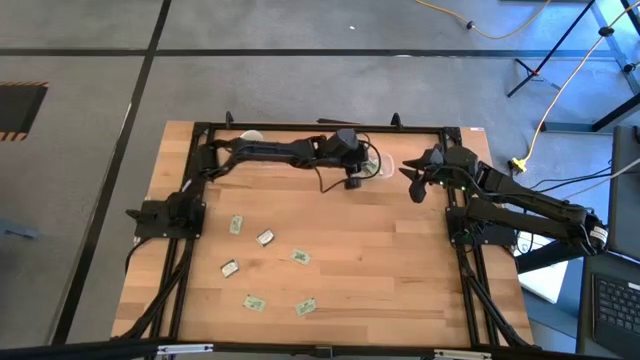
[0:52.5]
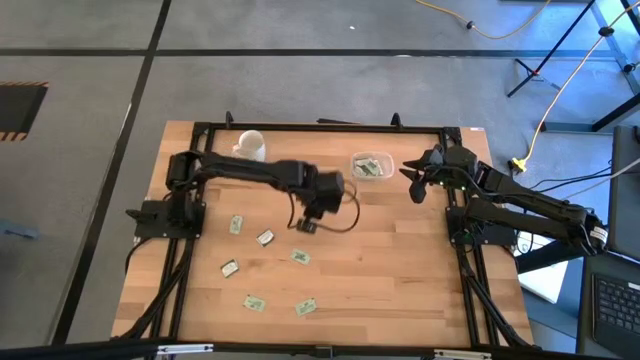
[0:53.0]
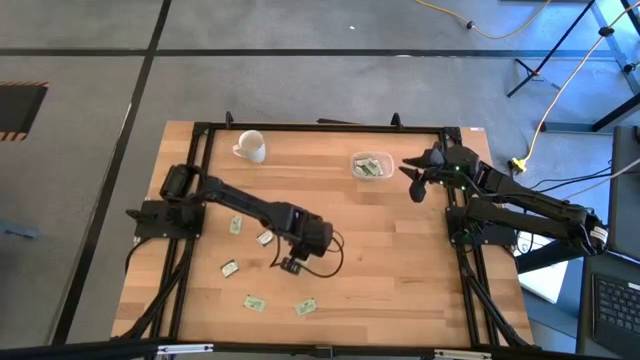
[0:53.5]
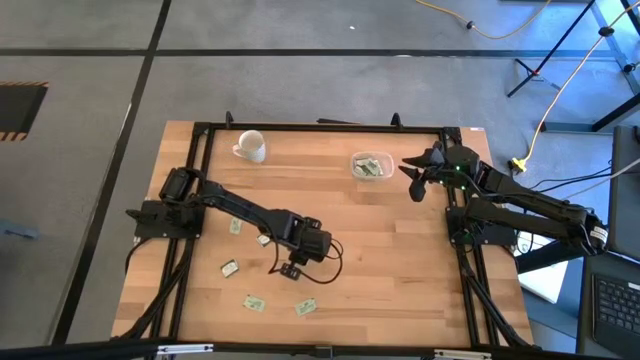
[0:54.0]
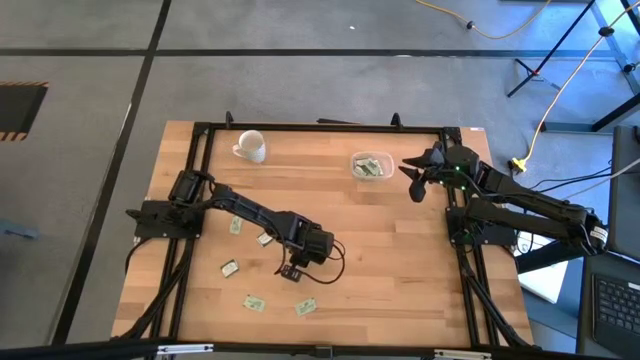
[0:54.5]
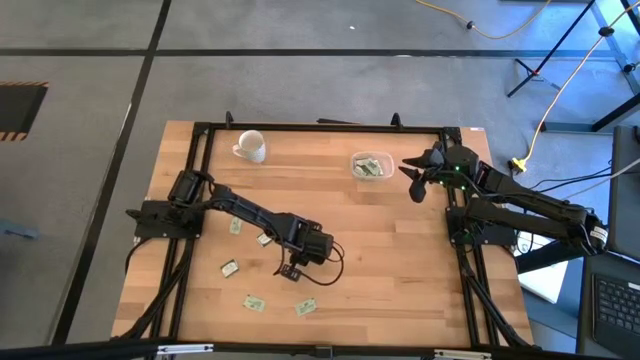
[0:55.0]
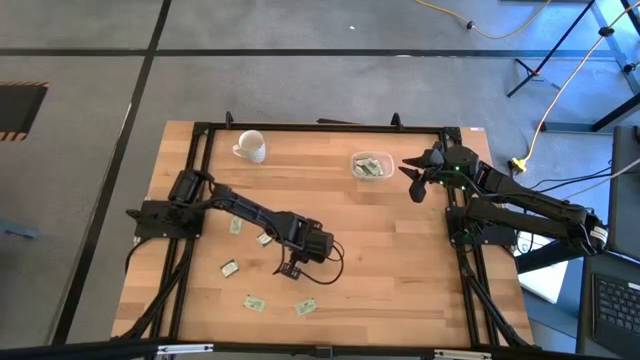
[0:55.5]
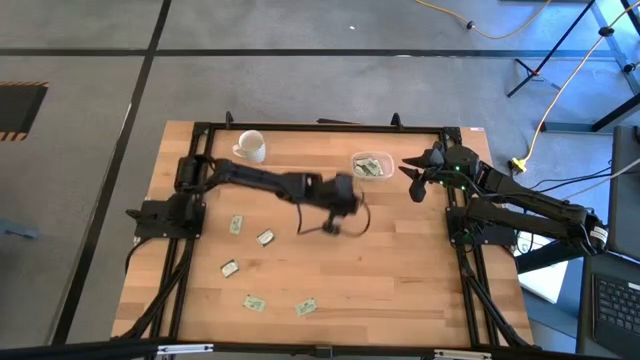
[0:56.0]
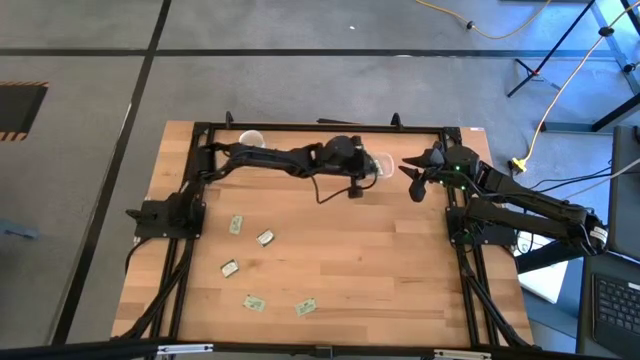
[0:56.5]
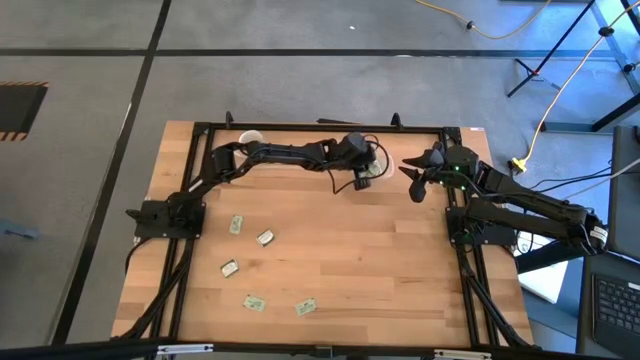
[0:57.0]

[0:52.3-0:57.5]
Task: Pick and place items into bin
Put the stevia packet into the transparent bin

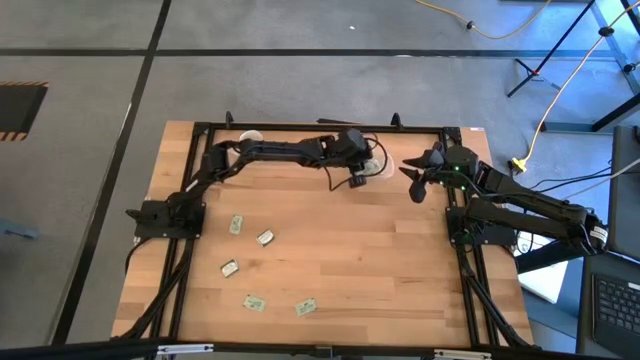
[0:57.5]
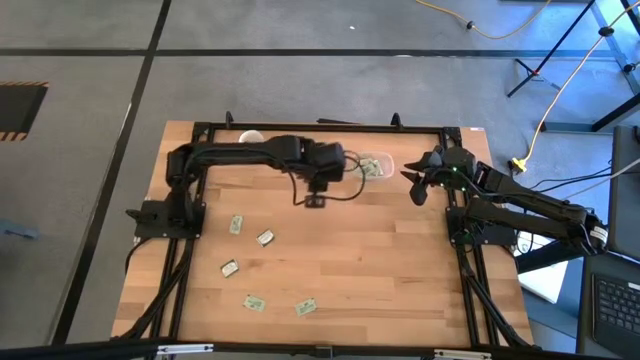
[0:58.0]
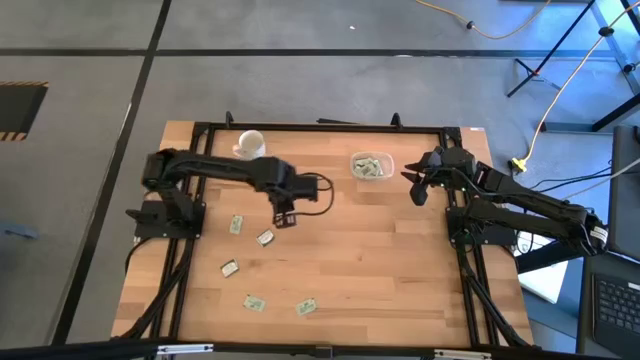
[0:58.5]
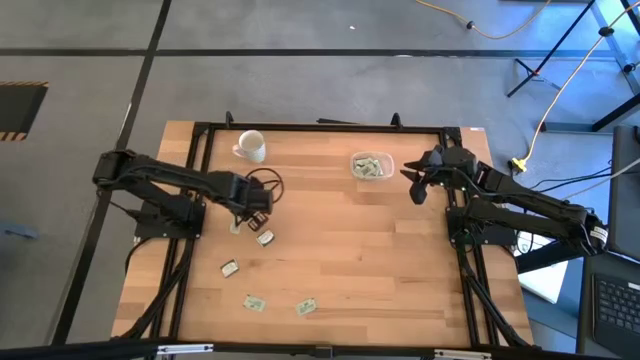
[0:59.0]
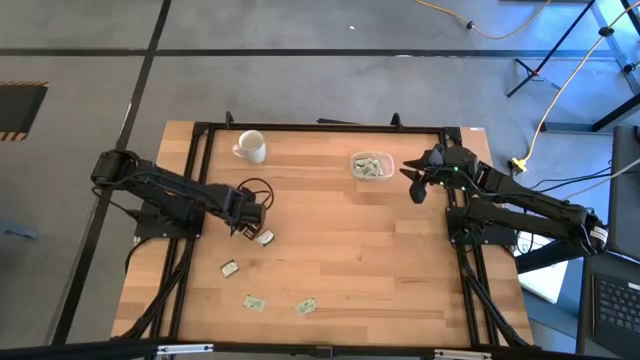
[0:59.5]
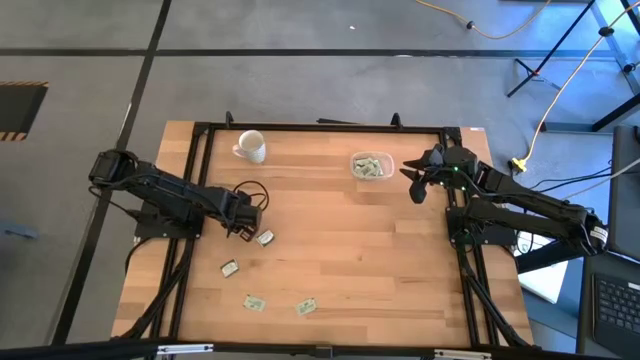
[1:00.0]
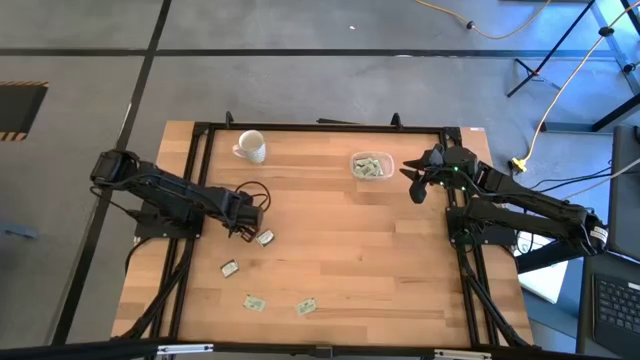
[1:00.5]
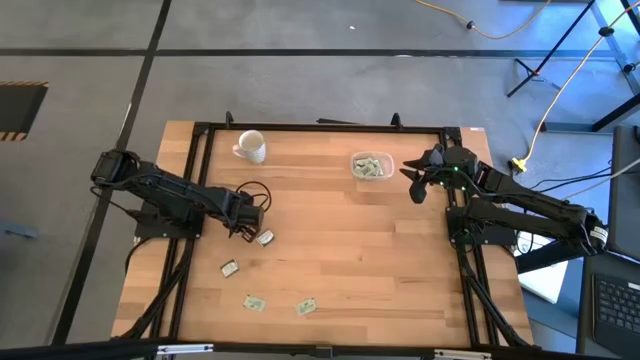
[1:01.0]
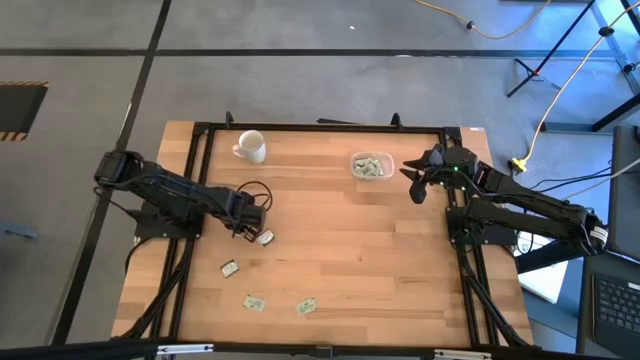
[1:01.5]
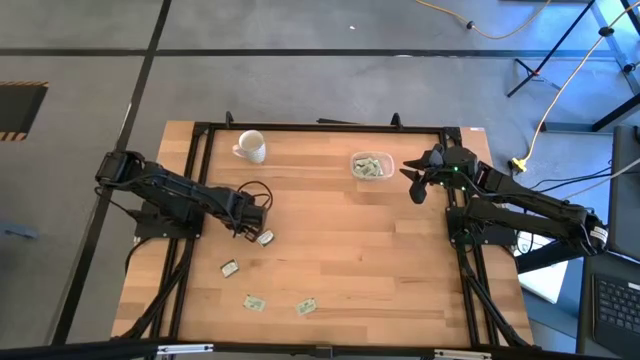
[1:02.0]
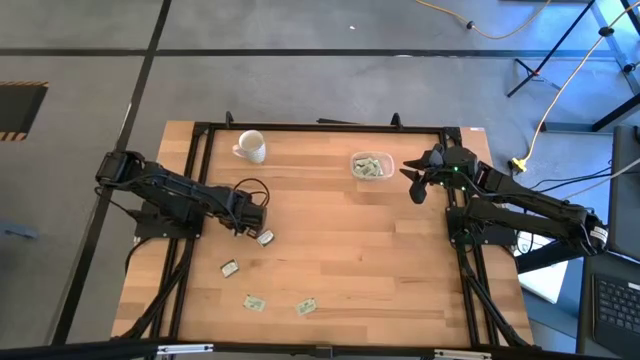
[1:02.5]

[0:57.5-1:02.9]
Put the stevia packet into the transparent bin

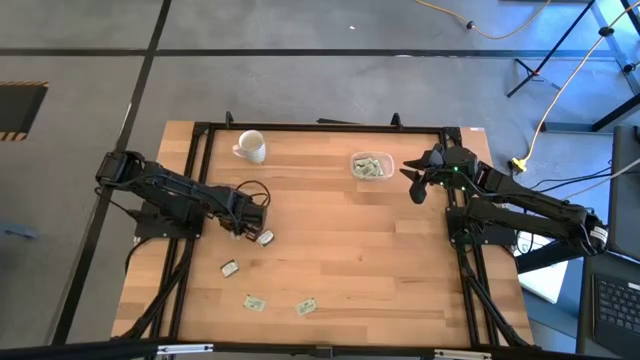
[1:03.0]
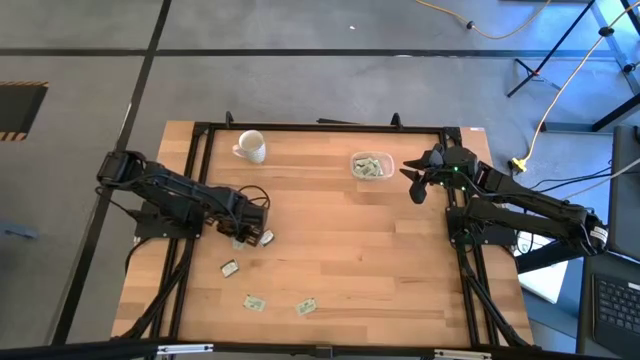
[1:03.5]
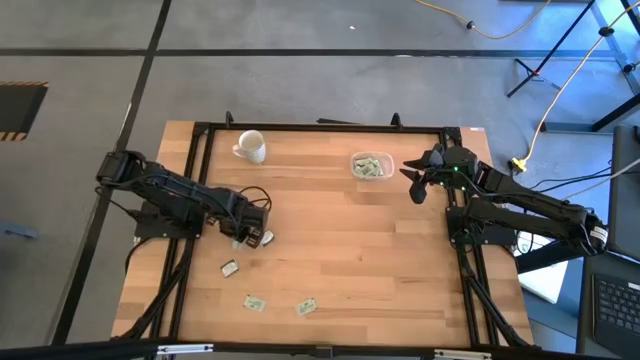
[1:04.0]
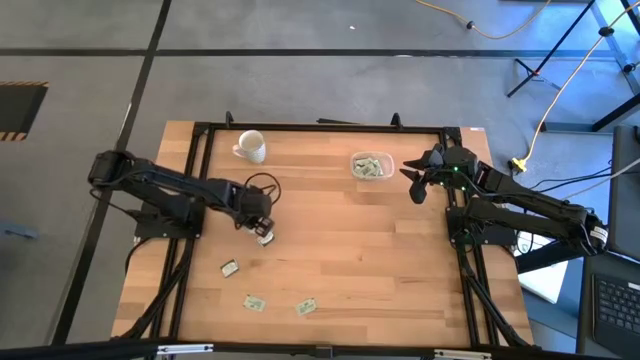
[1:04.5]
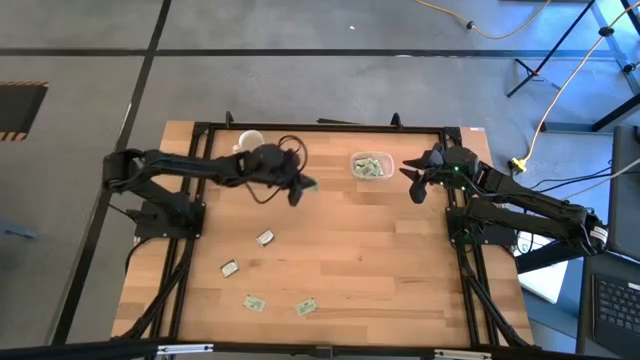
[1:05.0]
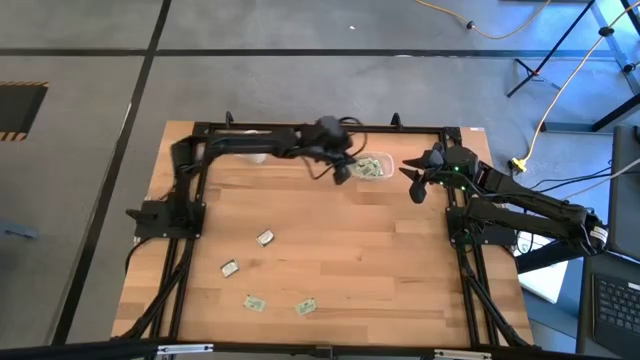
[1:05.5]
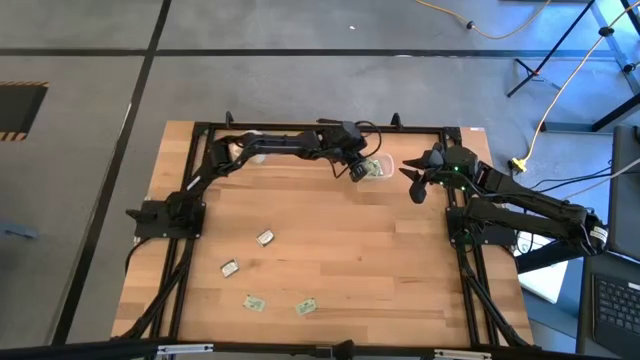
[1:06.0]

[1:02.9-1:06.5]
Put the stevia packet into the transparent bin

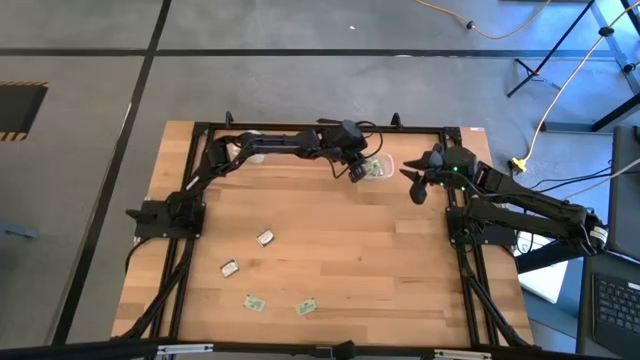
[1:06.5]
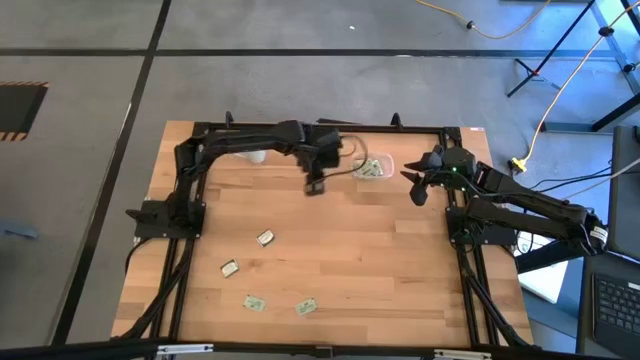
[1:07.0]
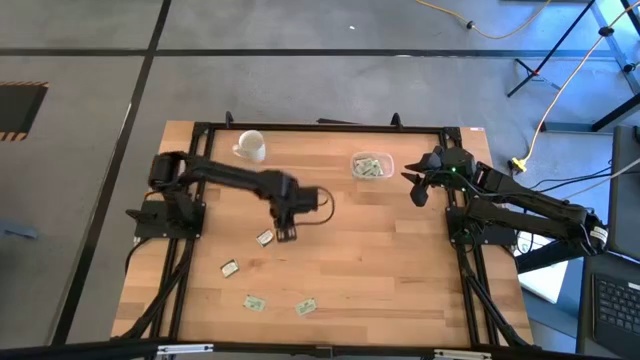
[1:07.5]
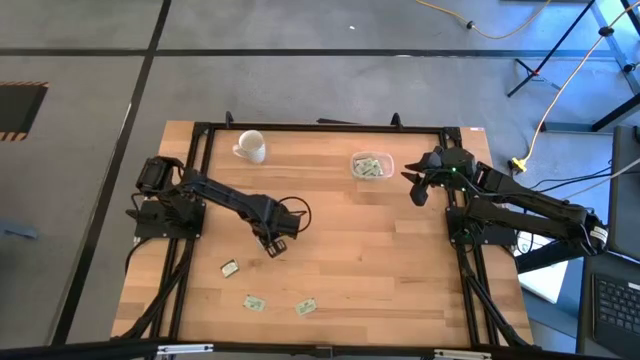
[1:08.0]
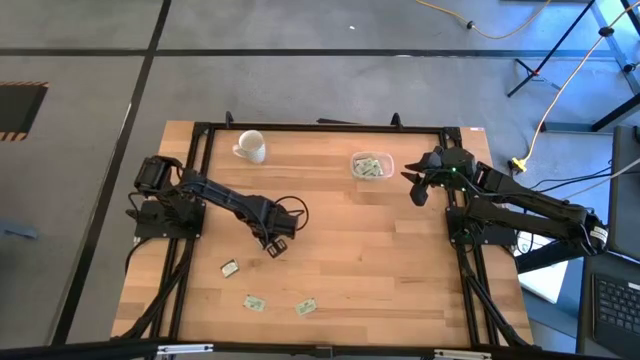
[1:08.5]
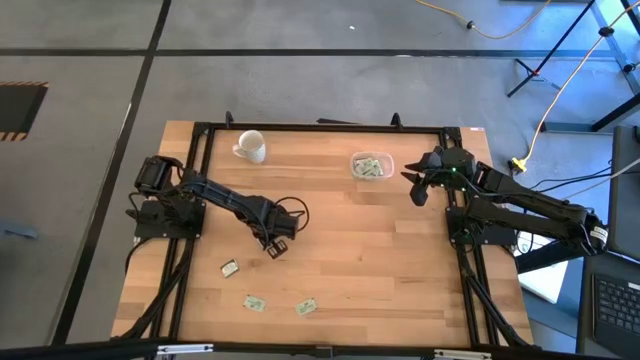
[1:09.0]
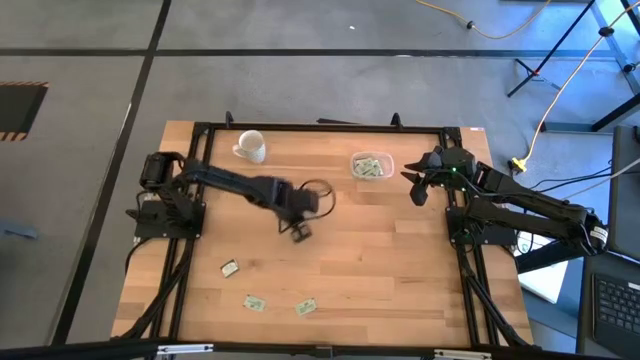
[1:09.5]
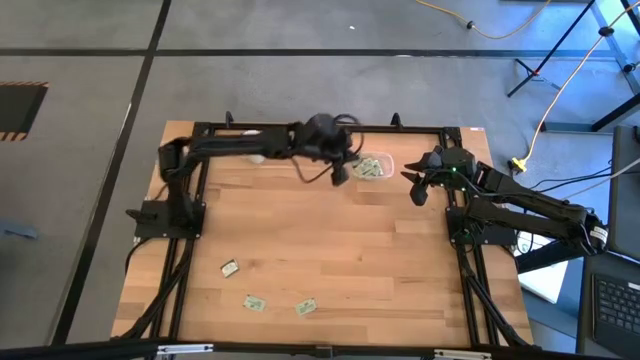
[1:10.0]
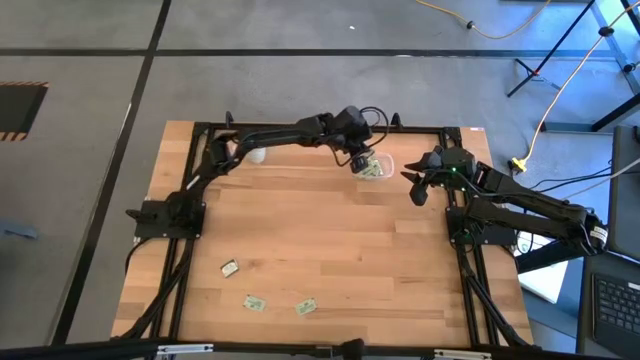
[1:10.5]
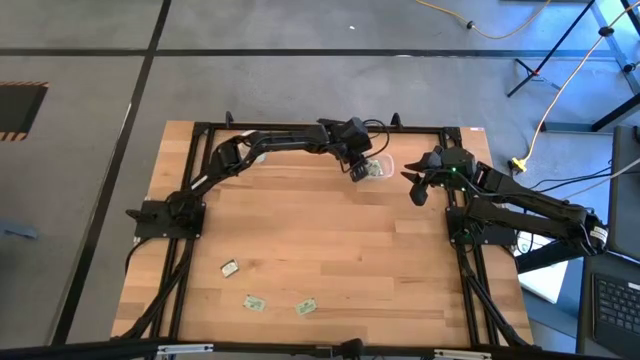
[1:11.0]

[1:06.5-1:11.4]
Put the truvia packet into the transparent bin

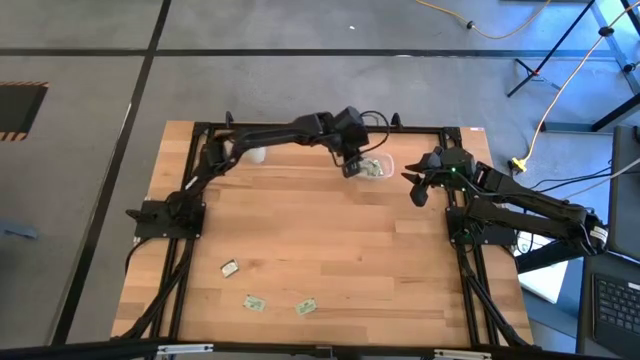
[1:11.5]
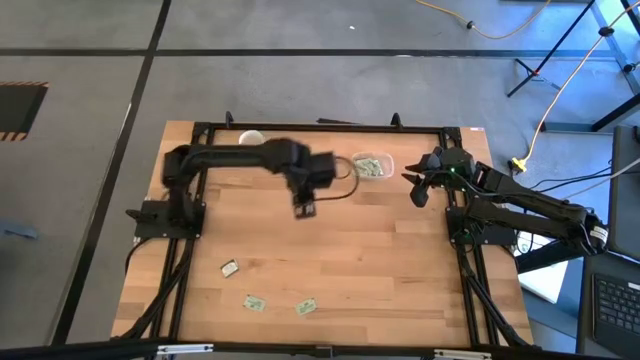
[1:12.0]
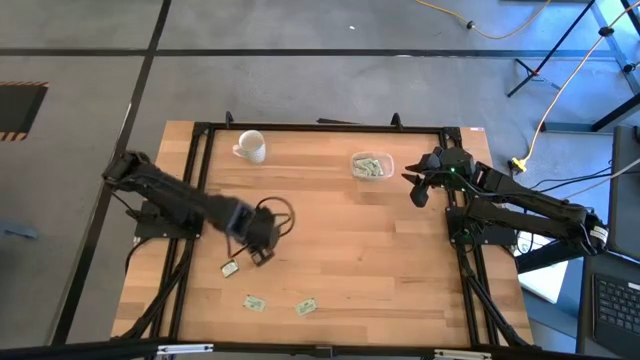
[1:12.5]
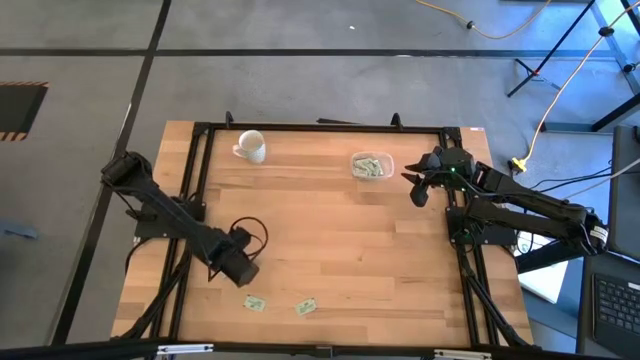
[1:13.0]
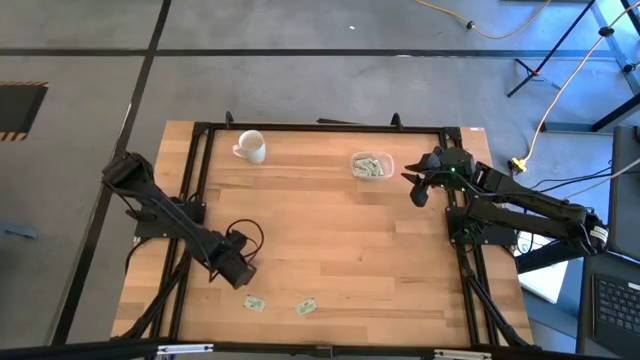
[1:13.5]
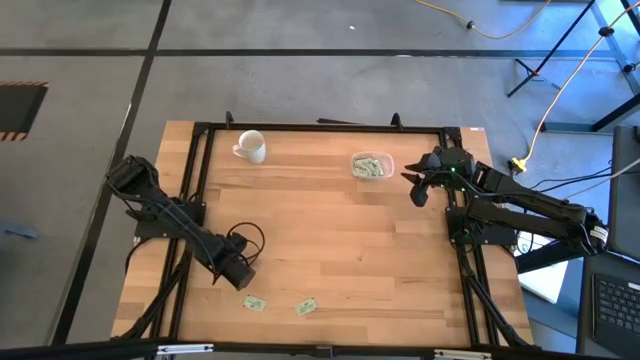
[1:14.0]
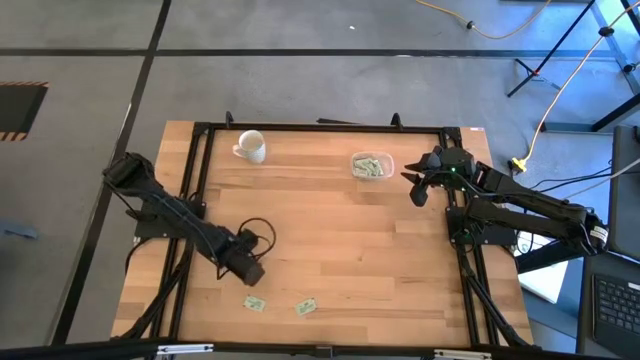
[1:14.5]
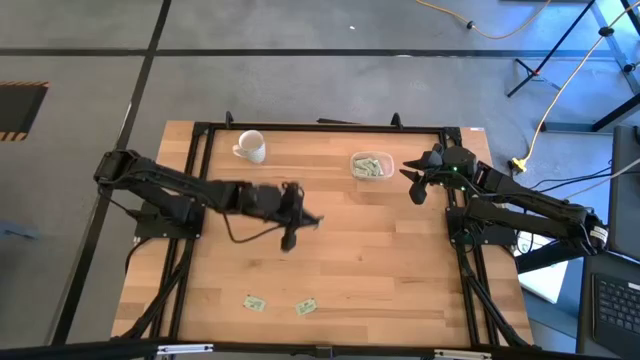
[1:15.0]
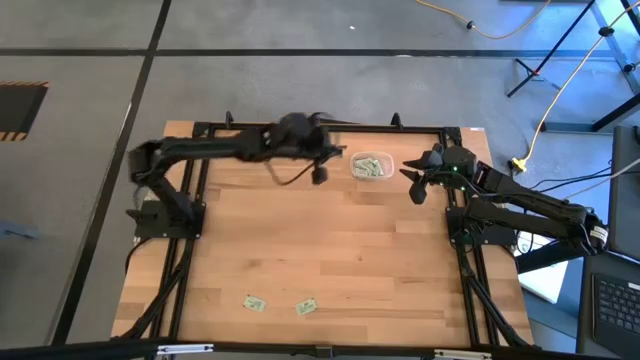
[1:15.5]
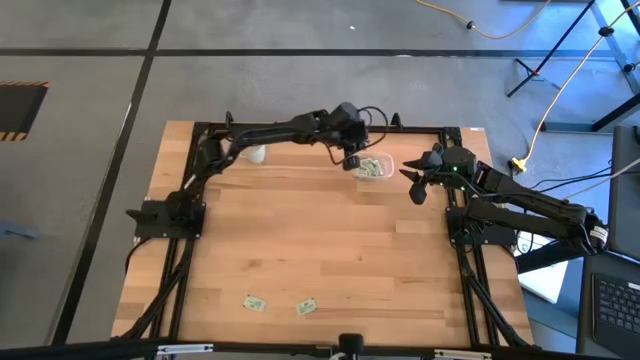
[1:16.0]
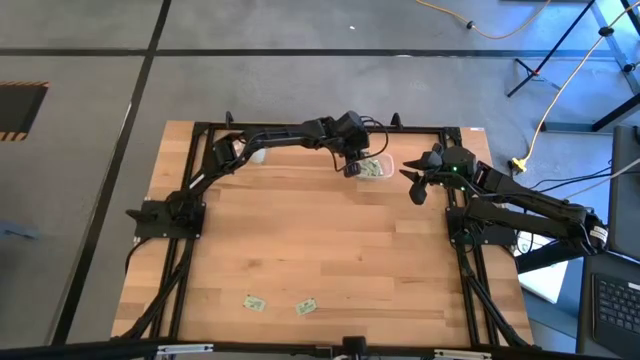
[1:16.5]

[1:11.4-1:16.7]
Put the truvia packet into the transparent bin
